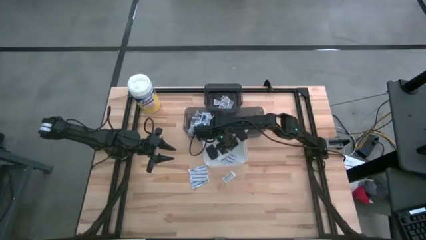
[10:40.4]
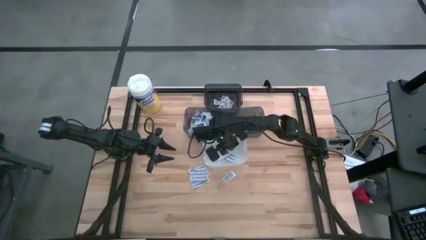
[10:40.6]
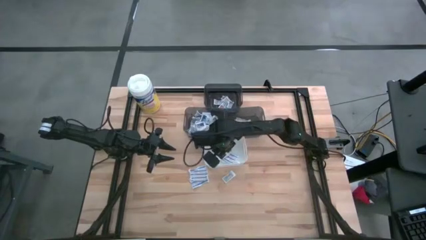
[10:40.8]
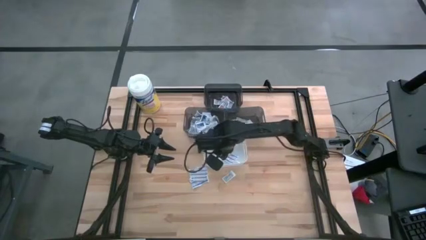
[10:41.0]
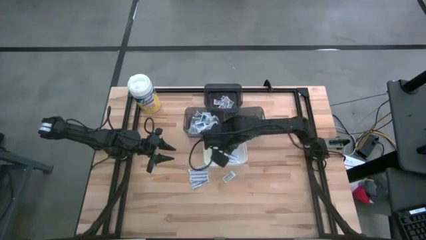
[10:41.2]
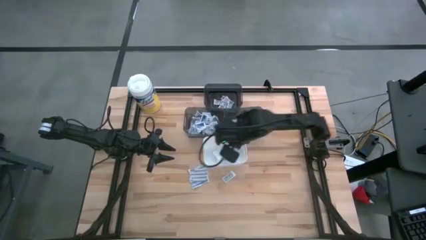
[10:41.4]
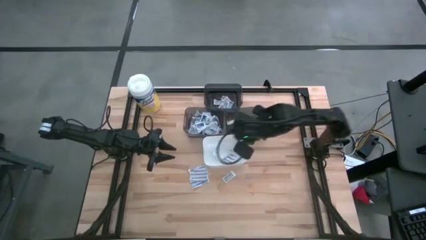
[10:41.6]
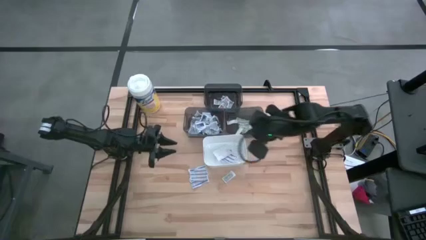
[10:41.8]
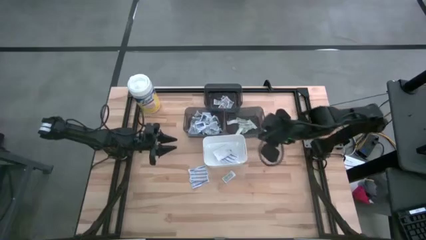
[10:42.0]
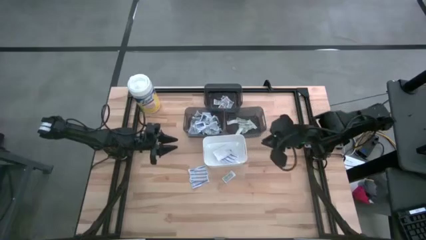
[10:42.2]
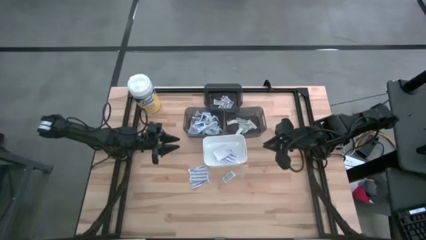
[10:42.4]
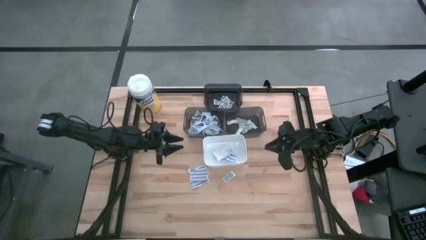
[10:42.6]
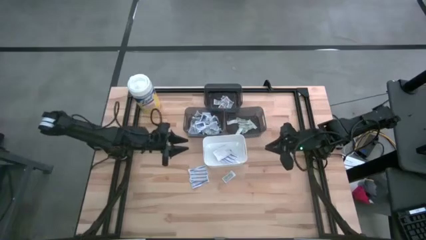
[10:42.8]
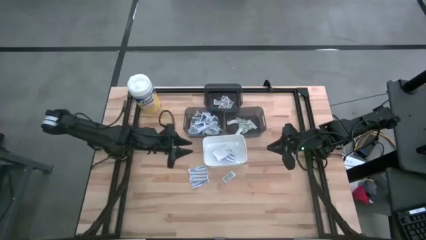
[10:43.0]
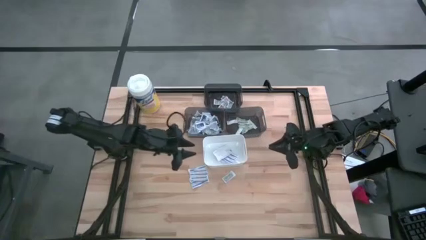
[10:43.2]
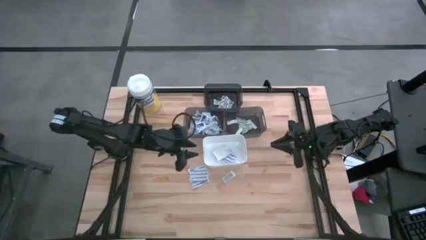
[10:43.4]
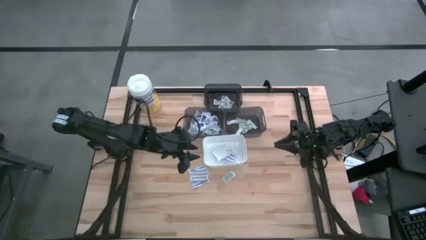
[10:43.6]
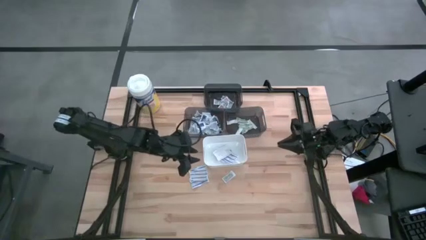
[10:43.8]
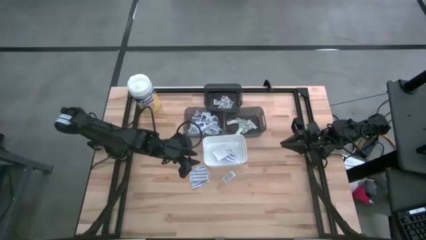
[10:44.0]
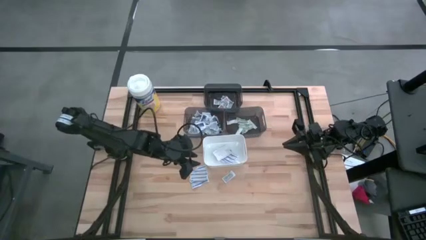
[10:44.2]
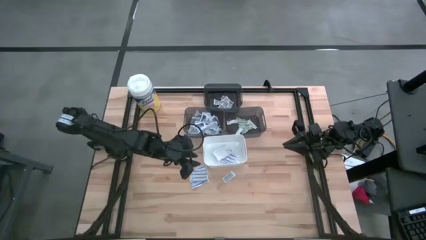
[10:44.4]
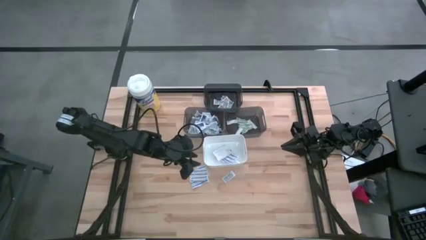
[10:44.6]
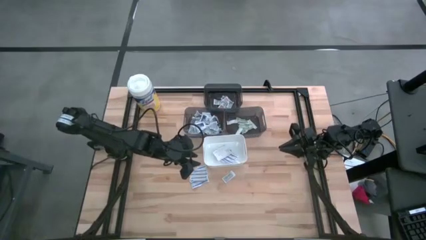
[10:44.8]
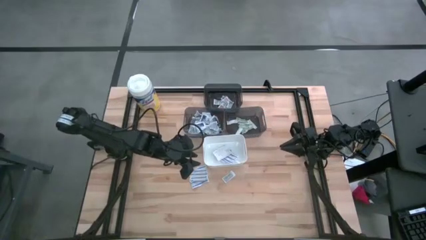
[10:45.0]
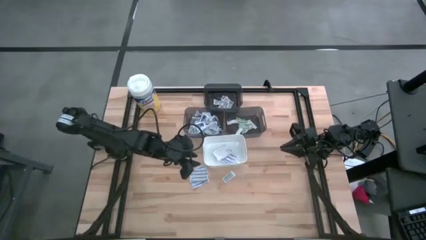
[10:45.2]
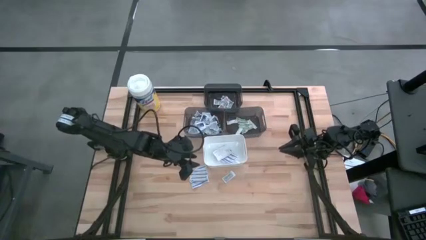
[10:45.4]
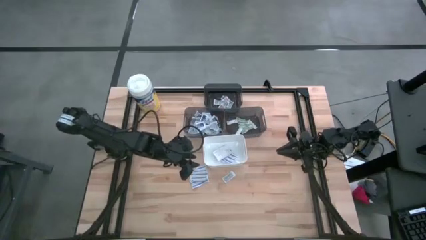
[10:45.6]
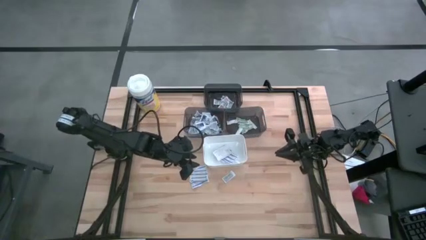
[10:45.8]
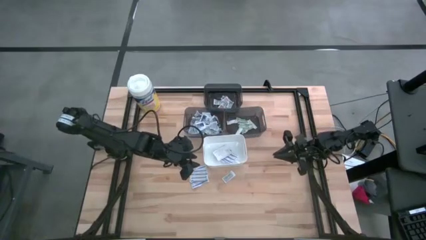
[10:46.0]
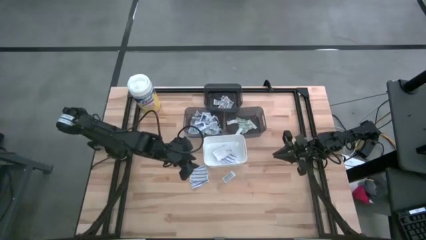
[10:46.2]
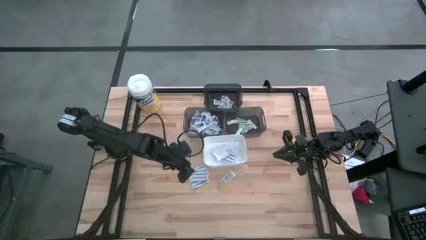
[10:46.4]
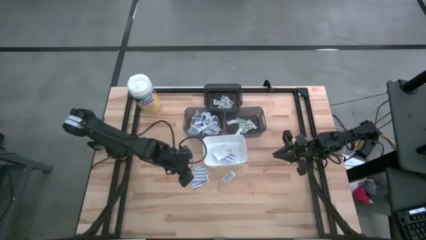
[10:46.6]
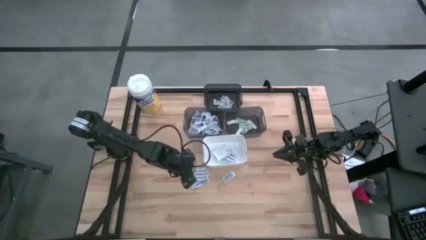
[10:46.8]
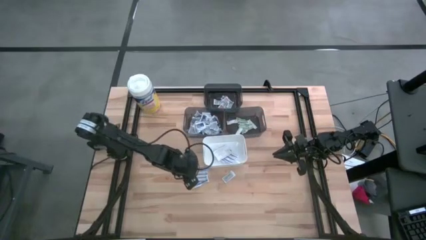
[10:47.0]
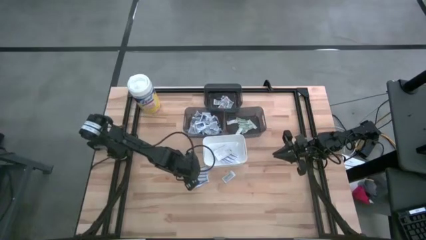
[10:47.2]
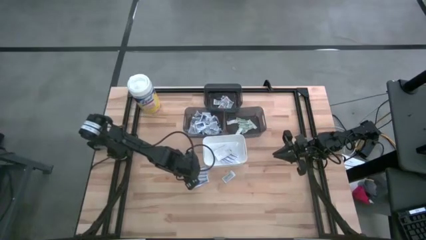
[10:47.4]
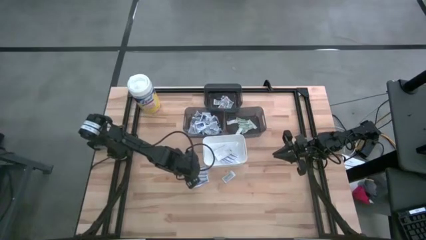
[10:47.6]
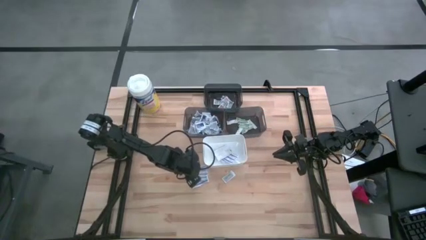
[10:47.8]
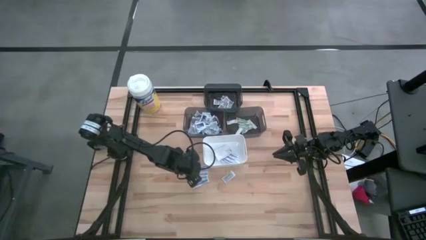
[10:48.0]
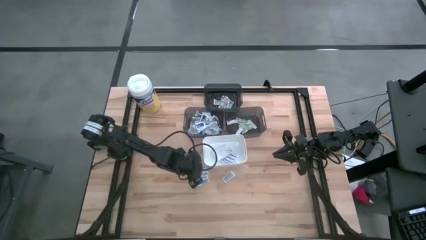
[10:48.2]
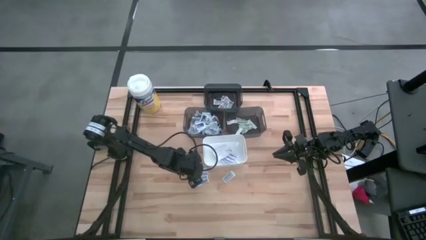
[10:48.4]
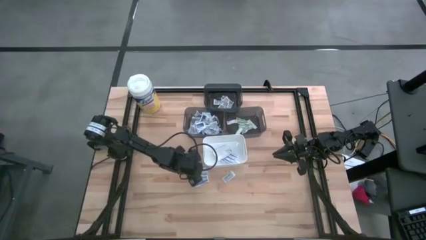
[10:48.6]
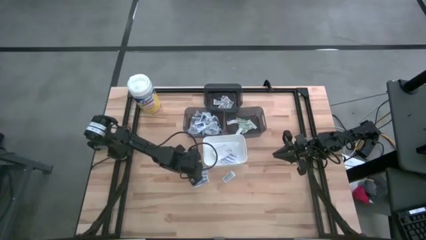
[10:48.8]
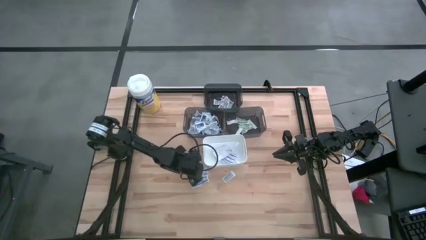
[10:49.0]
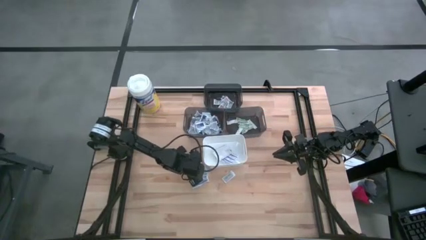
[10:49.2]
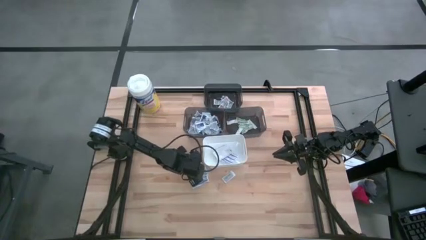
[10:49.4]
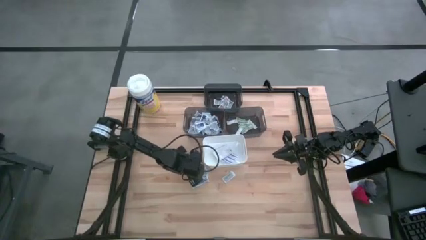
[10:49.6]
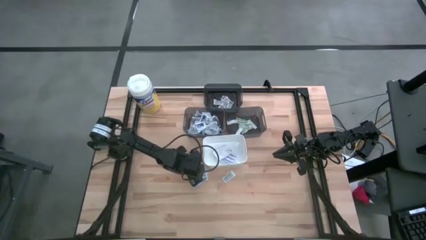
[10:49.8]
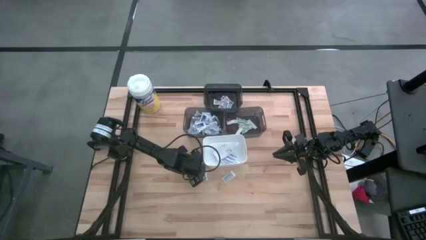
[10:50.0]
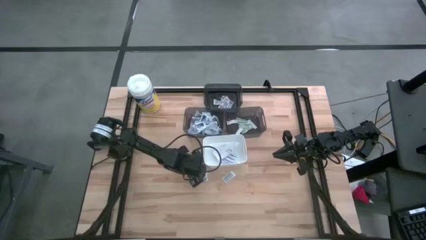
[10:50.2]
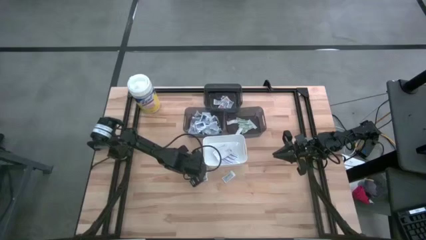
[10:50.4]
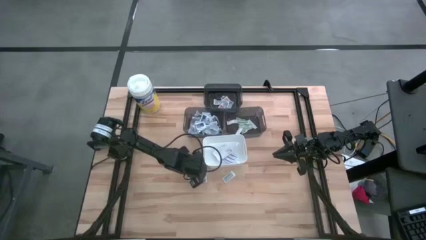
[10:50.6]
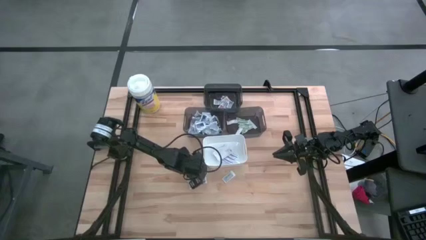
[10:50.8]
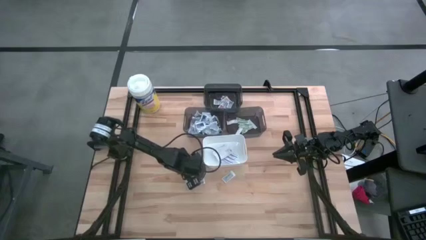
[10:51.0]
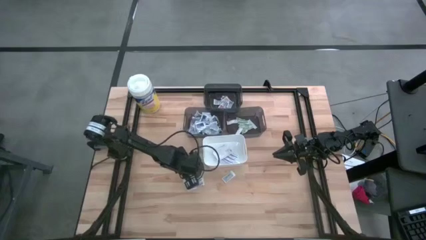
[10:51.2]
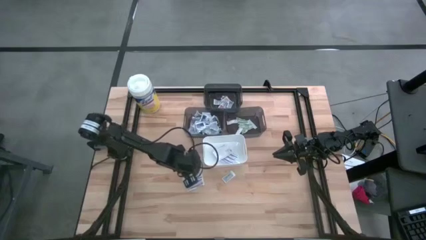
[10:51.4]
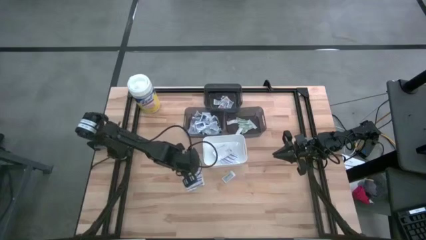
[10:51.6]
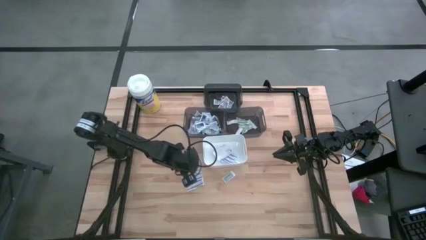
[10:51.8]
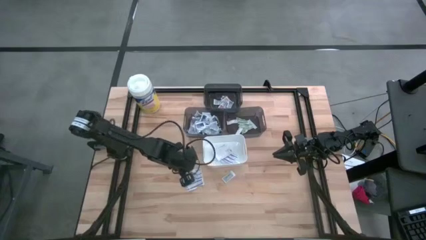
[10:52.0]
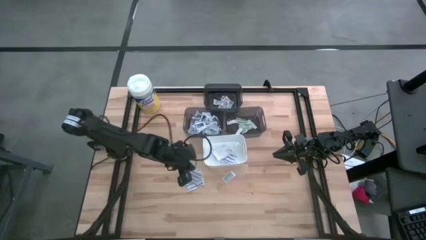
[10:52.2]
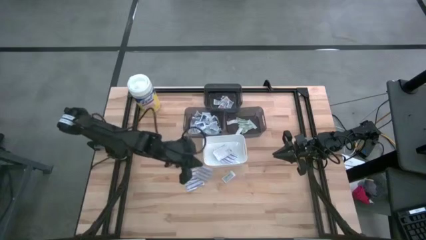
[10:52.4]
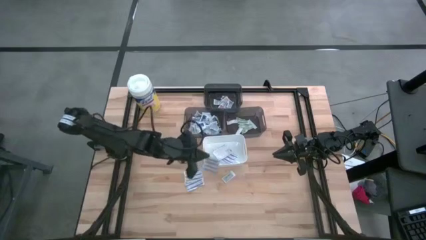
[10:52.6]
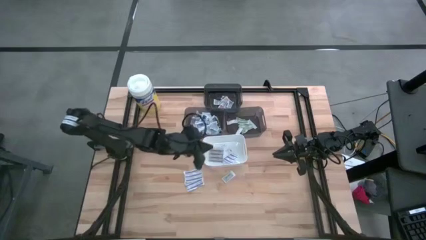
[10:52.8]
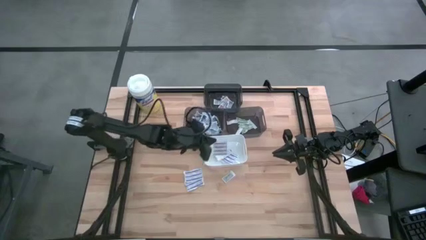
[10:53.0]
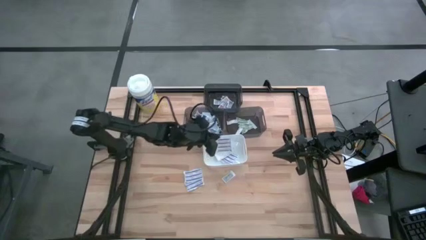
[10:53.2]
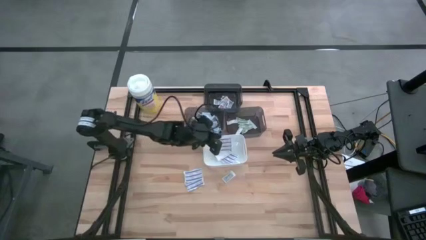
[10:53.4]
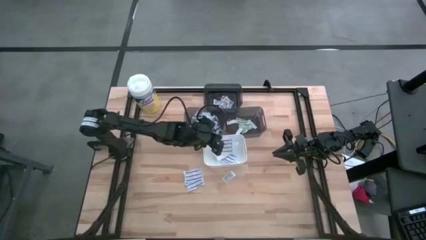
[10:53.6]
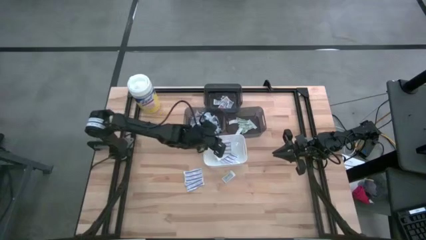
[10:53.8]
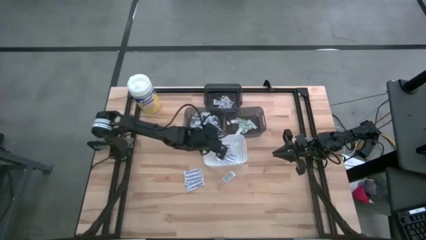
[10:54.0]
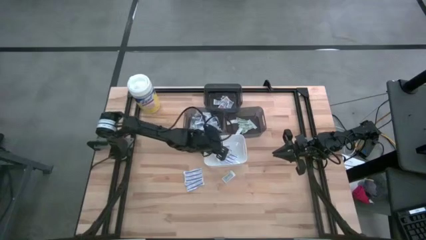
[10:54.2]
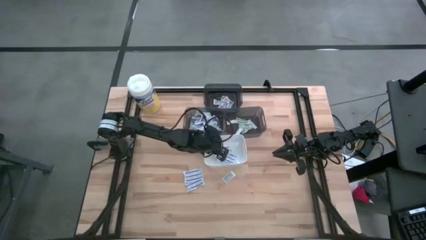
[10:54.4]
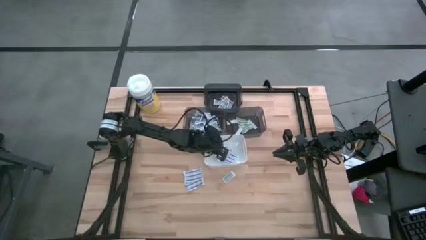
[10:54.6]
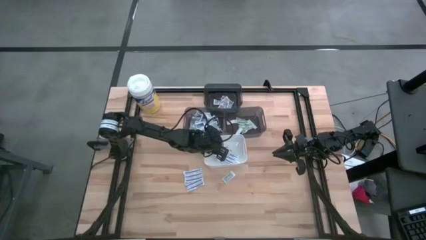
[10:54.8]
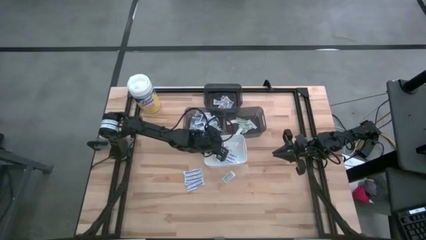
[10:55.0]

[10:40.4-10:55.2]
Task: Pick & Place First Aid Supplies
Put the blue bandage into the white bin

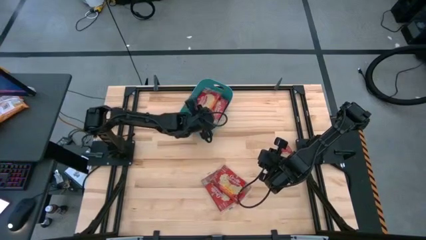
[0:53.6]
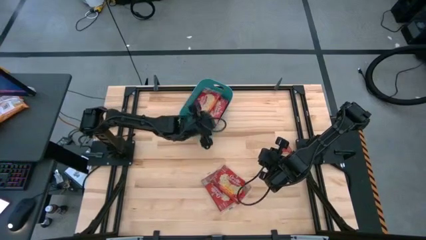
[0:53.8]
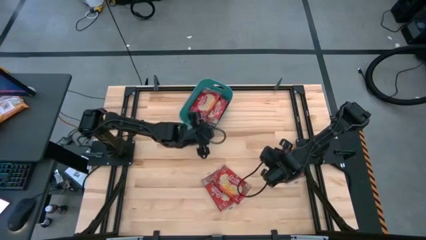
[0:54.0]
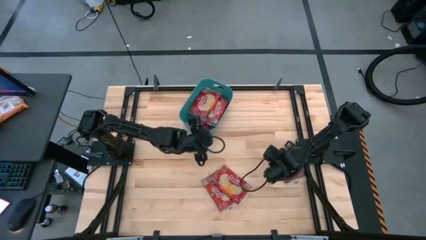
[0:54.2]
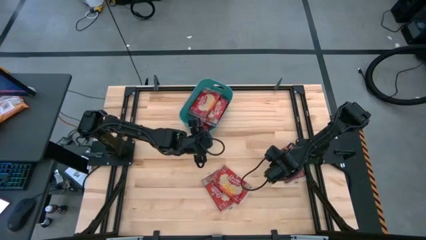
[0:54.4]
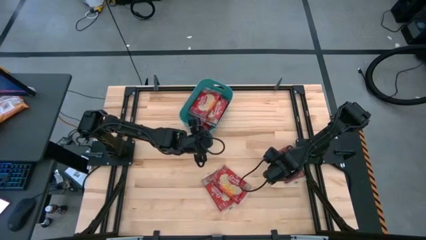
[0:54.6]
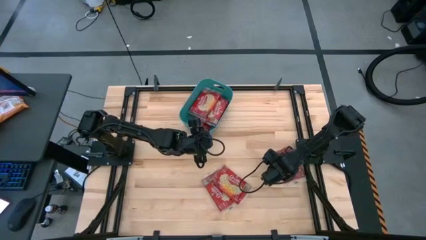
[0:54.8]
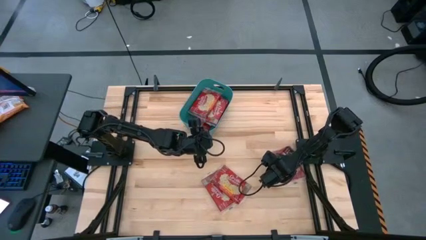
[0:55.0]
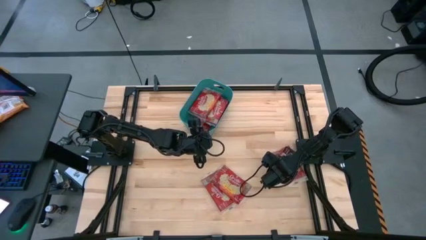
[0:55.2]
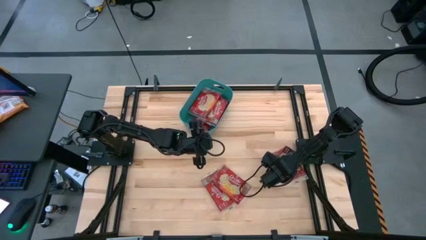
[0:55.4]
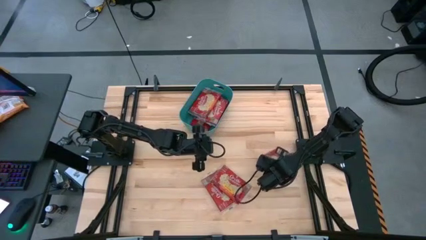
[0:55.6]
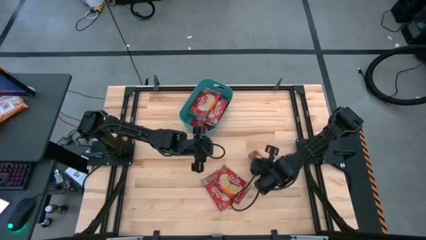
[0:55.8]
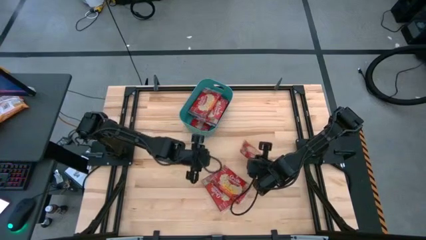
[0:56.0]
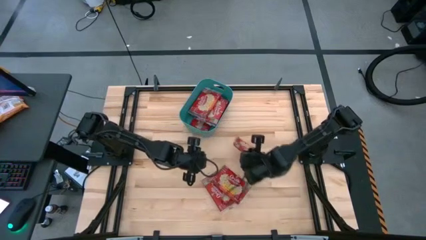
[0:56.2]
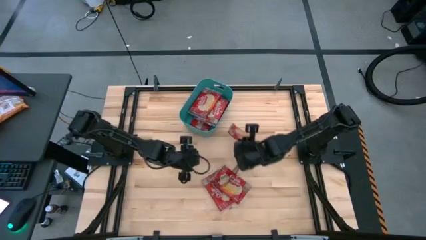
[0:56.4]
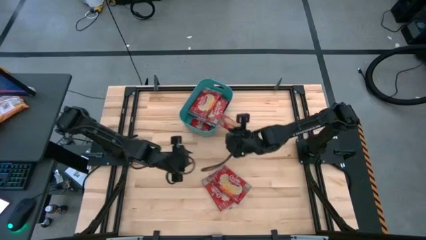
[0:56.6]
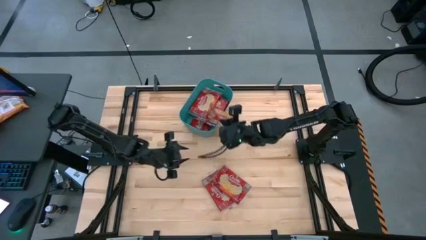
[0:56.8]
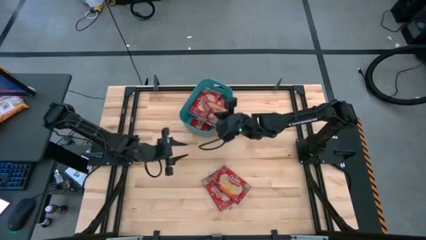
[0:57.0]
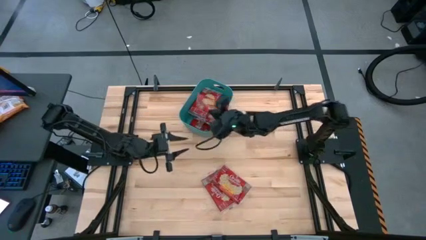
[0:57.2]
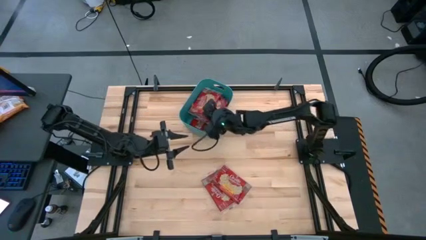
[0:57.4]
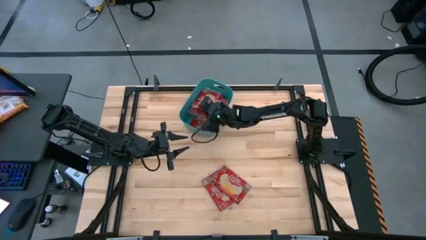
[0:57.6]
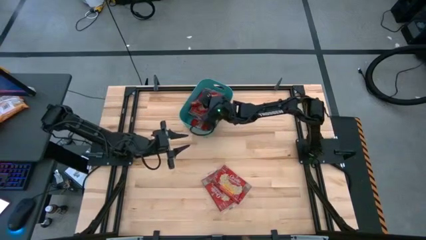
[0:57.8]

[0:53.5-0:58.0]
Task: Sort popcorn bags into baskets
Put the popcorn bag into the green bin
